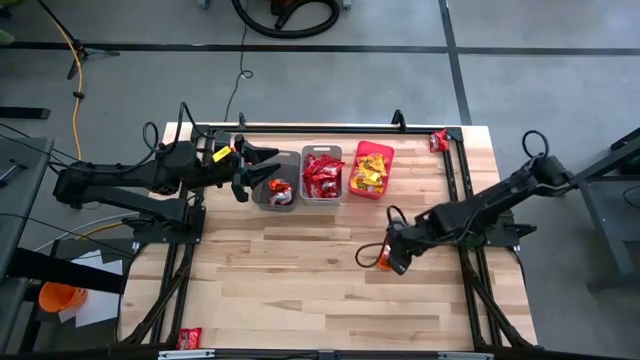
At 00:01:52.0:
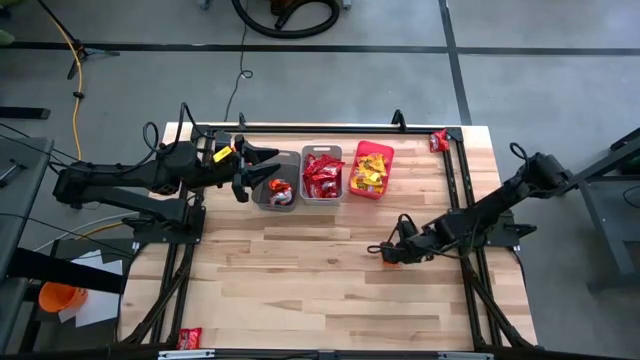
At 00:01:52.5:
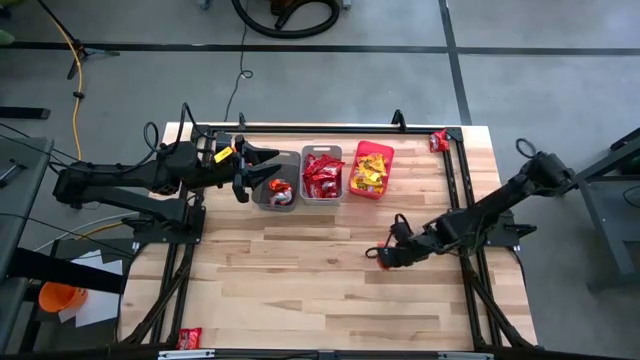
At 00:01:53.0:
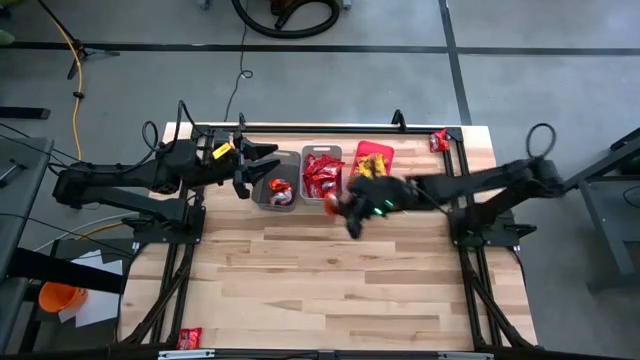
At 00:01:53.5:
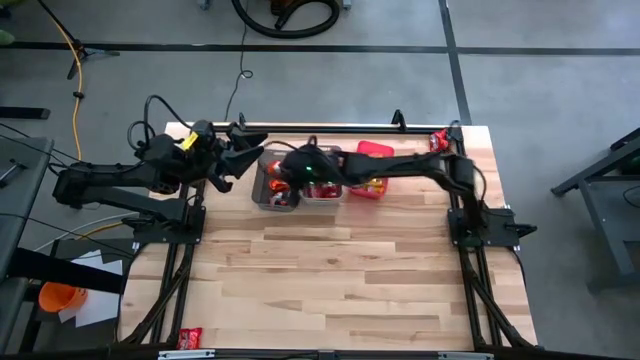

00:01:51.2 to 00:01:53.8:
Task: Sort candy
Put the bottom right orange candy into the black bin

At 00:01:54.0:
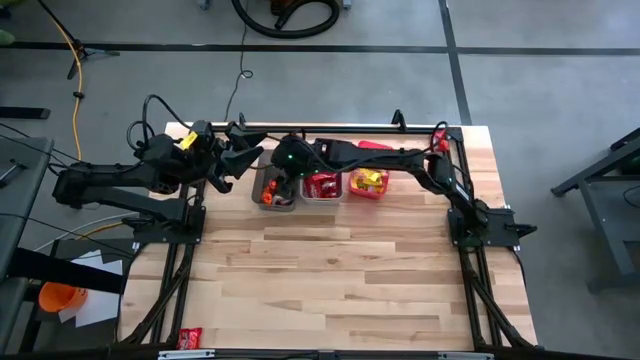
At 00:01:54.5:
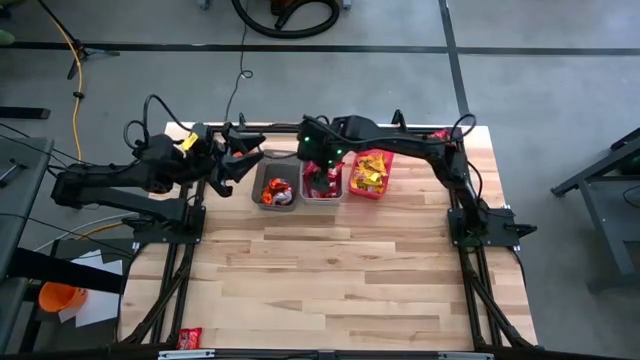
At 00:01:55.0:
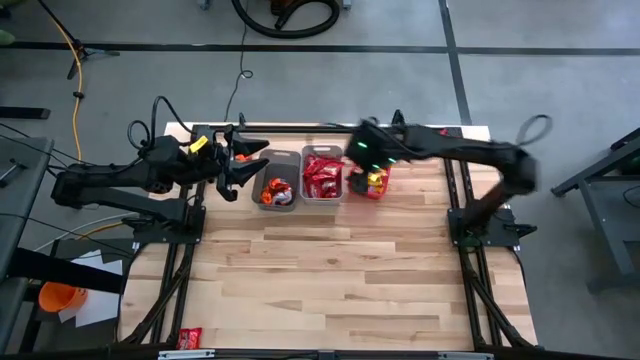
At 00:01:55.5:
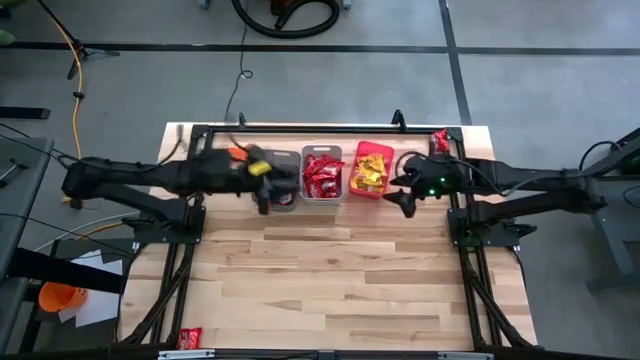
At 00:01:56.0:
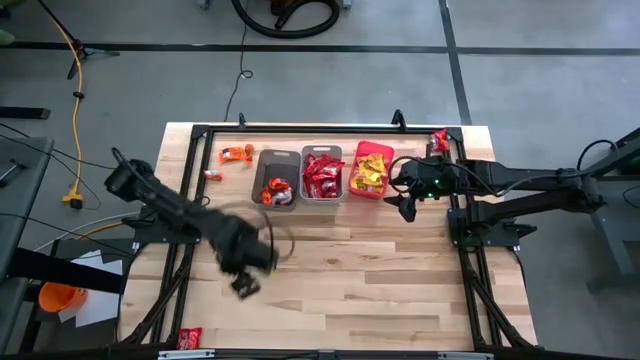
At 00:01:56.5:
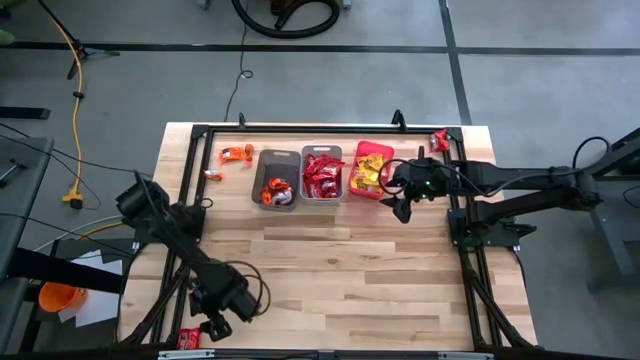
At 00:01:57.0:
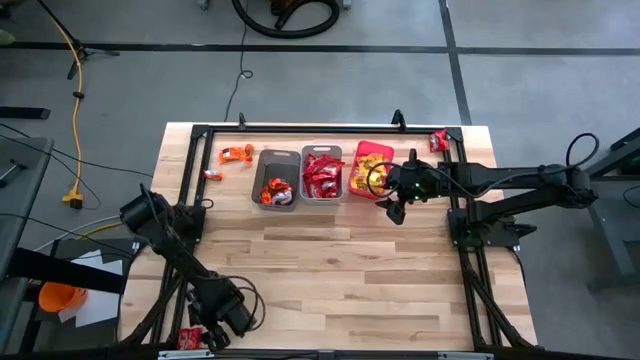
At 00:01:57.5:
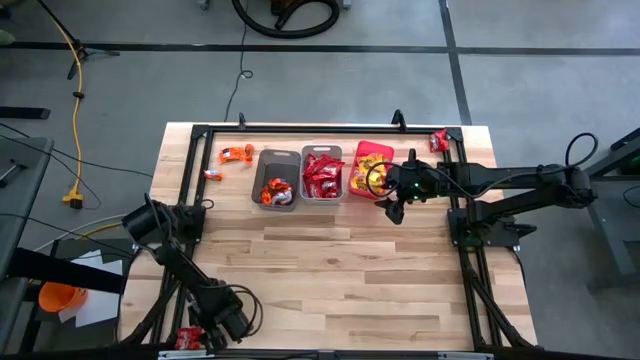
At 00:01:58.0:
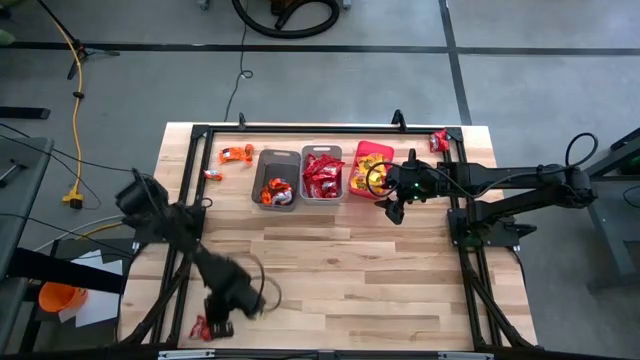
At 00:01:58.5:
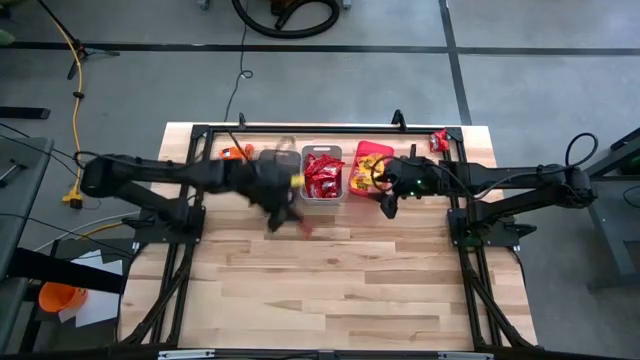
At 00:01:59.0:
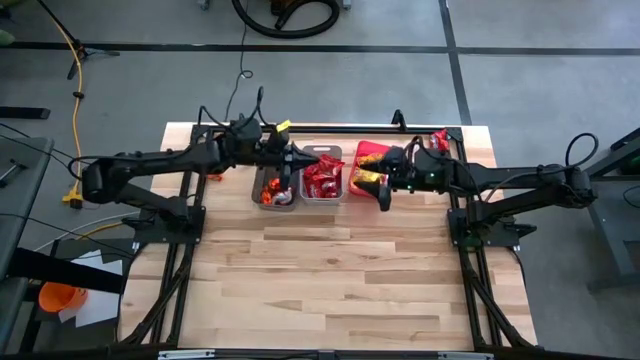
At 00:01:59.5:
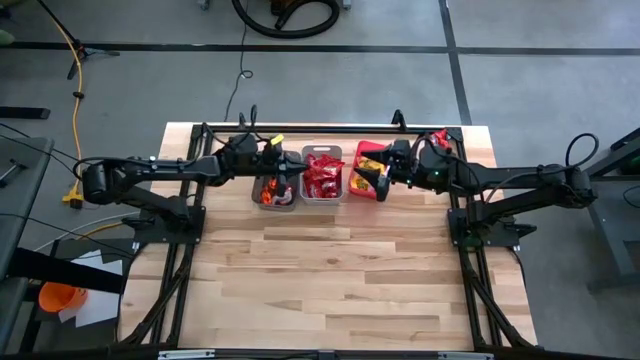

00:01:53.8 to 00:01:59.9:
Put the bottom left red candy into the gray bin

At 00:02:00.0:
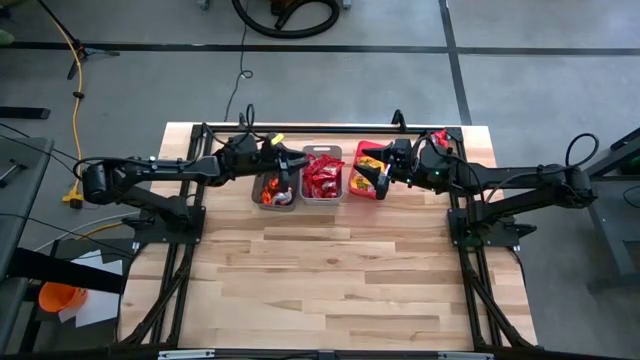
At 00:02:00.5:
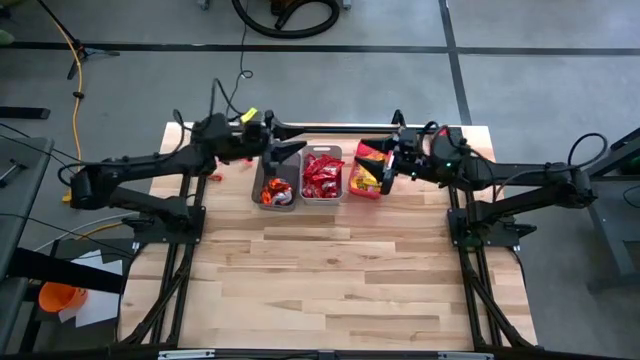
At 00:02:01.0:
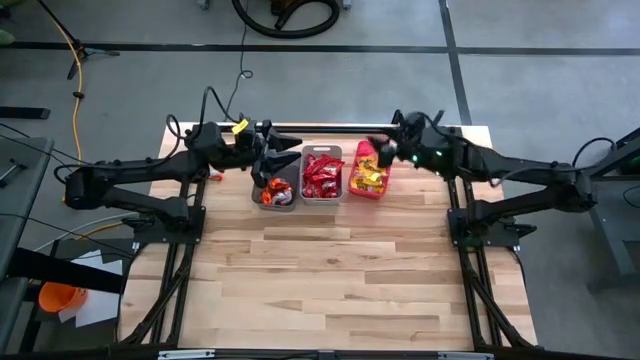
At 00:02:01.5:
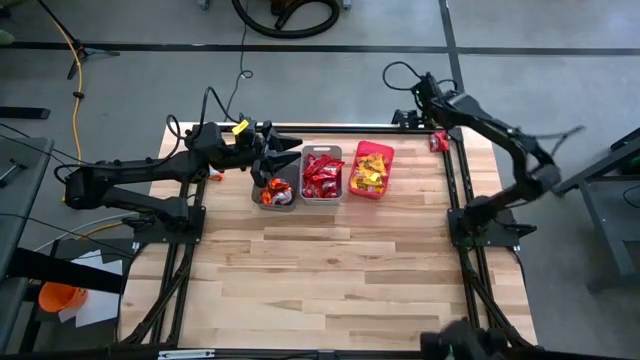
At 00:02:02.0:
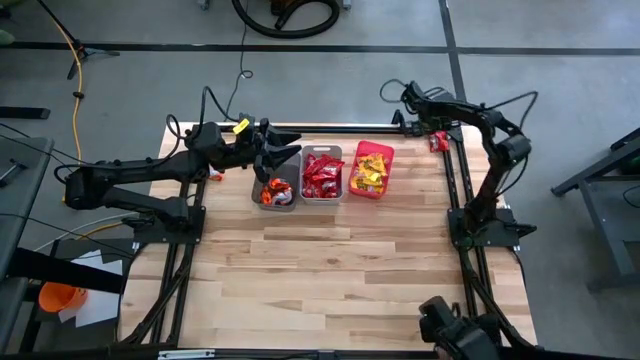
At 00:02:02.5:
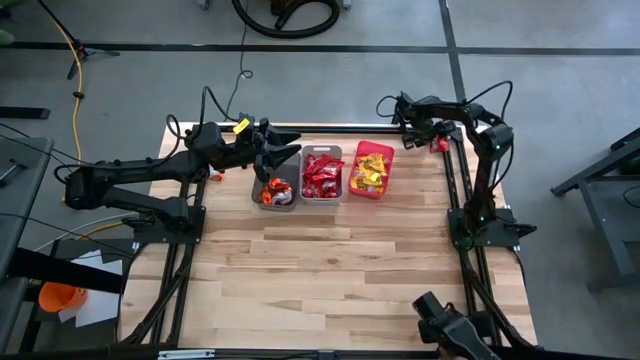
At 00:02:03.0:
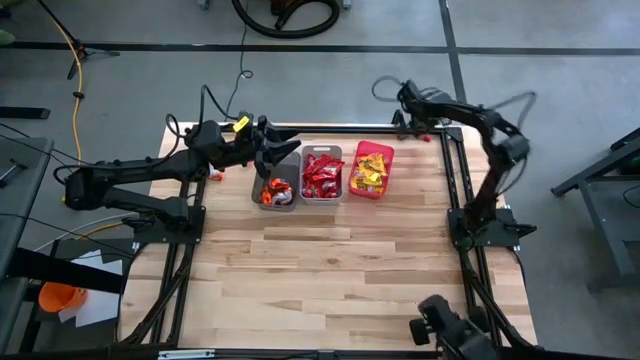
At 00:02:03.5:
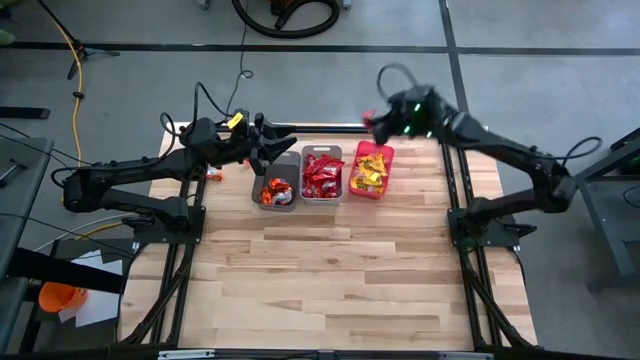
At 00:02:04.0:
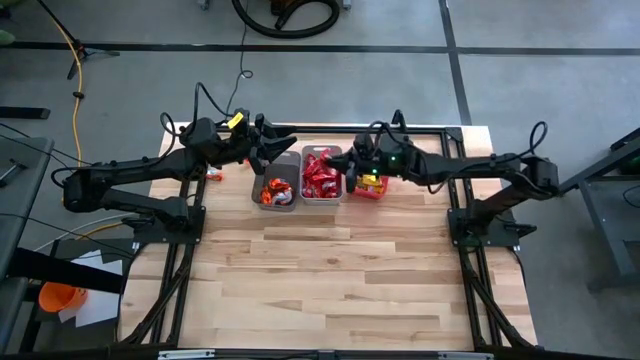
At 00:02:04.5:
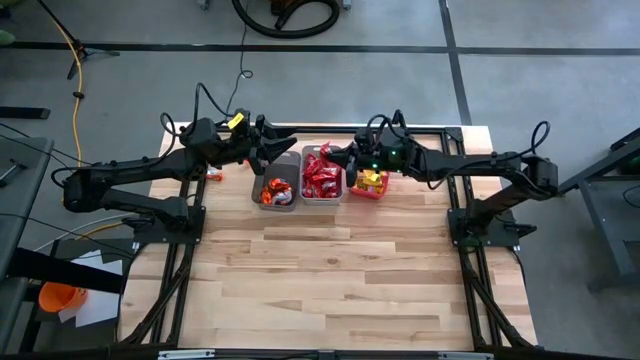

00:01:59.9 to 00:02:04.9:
Put the top right red candy into the gray bin

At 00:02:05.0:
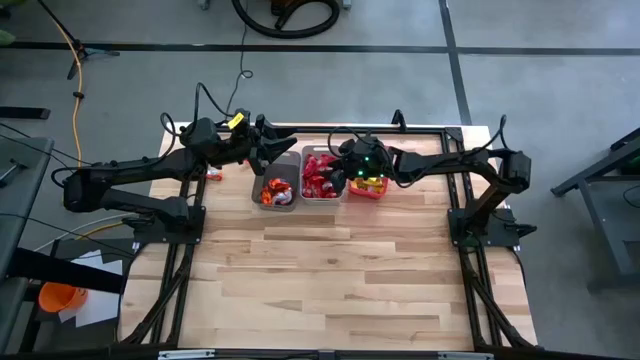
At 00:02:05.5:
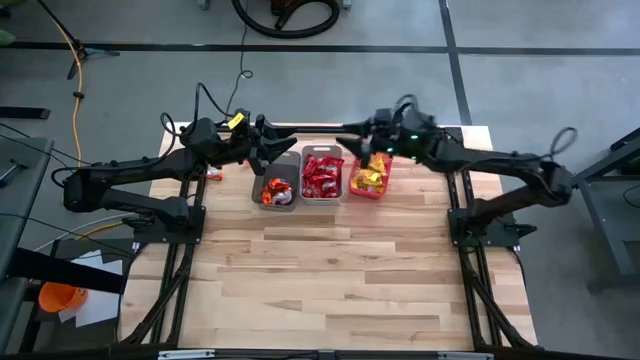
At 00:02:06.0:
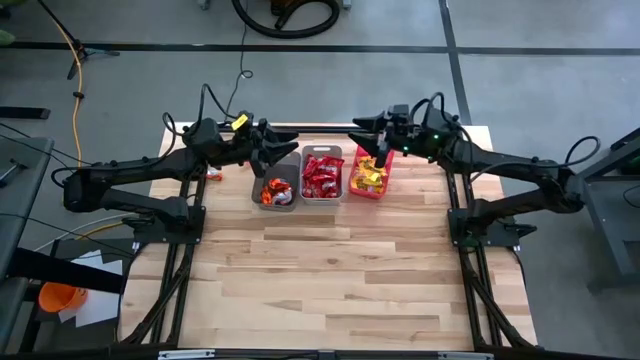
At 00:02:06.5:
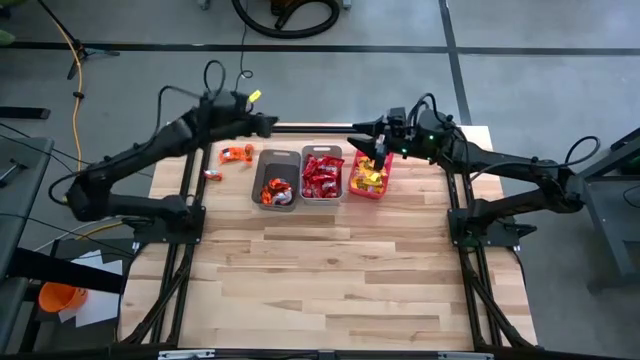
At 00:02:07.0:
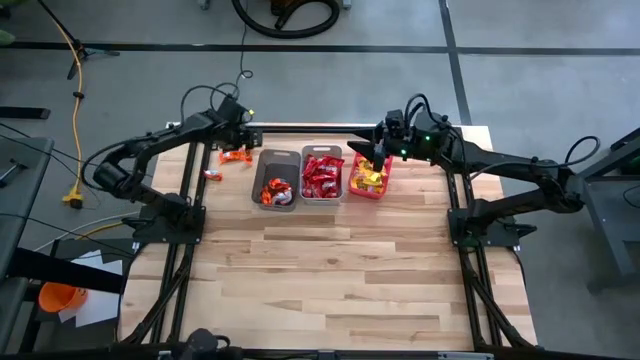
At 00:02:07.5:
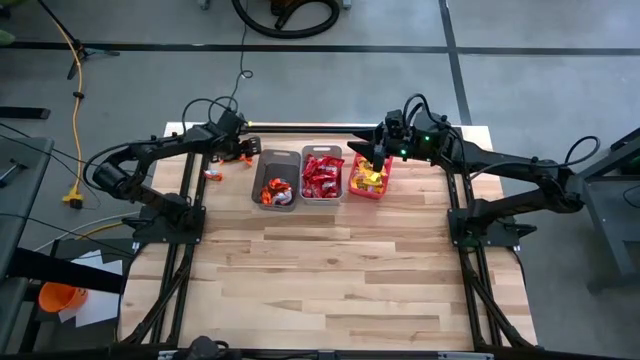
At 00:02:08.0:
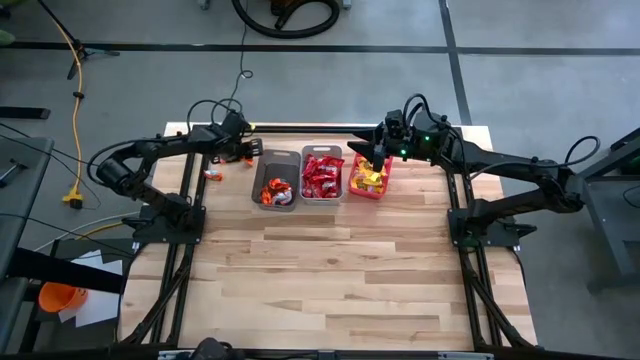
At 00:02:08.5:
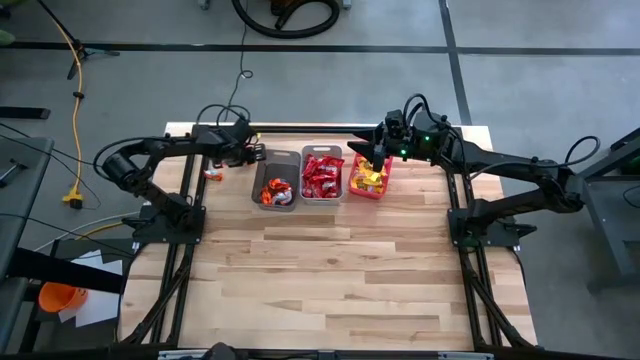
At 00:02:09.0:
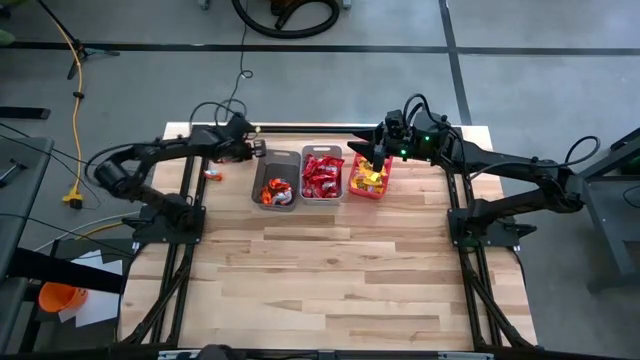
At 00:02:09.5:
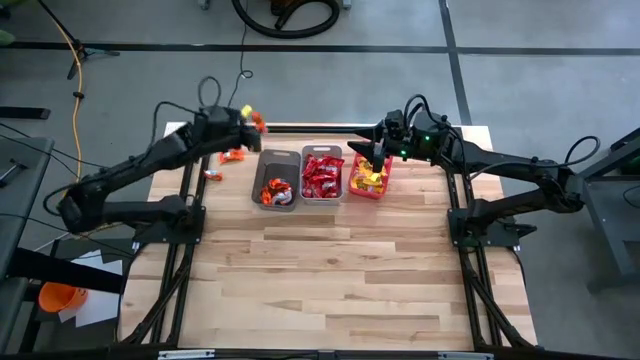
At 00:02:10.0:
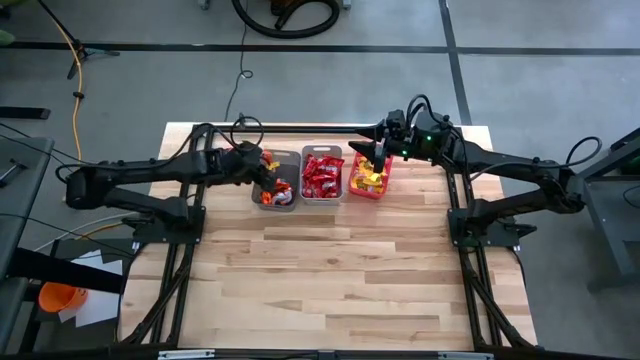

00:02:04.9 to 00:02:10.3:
Put the top left candy into the black bin

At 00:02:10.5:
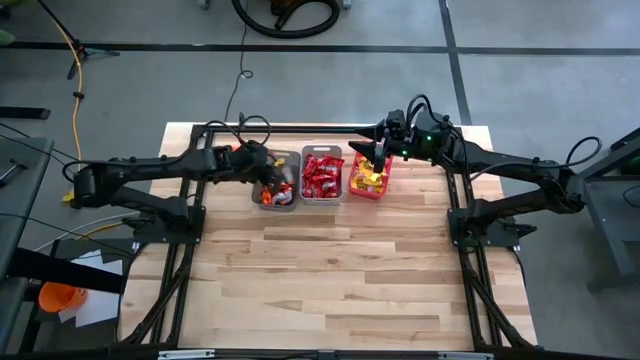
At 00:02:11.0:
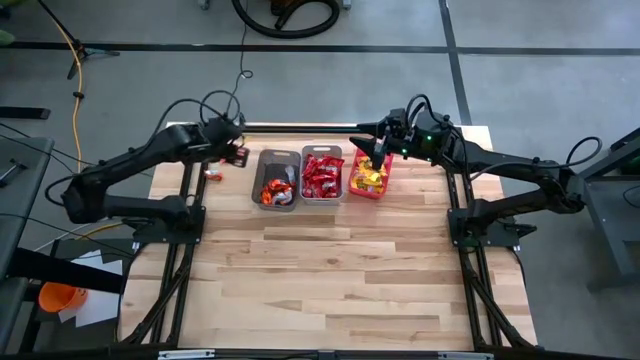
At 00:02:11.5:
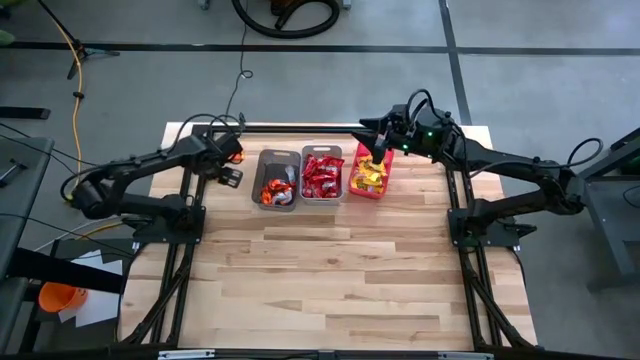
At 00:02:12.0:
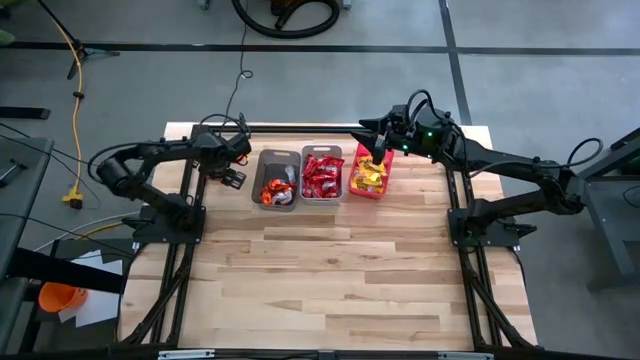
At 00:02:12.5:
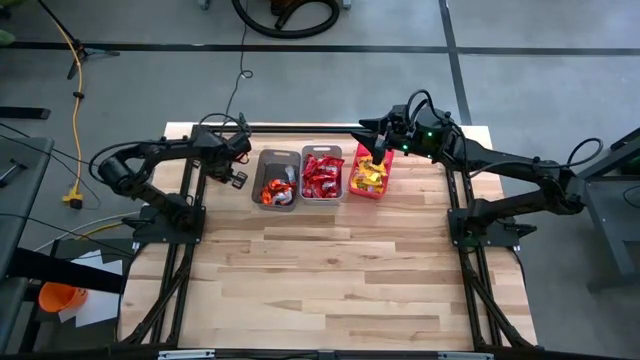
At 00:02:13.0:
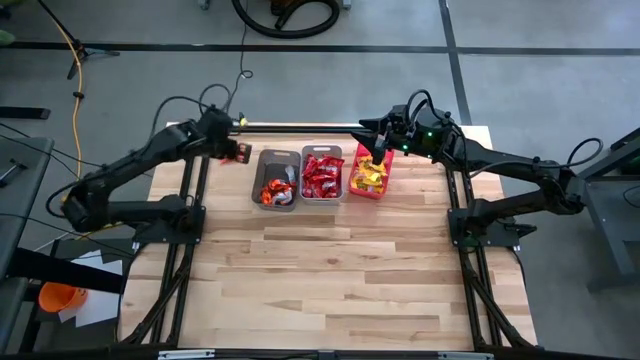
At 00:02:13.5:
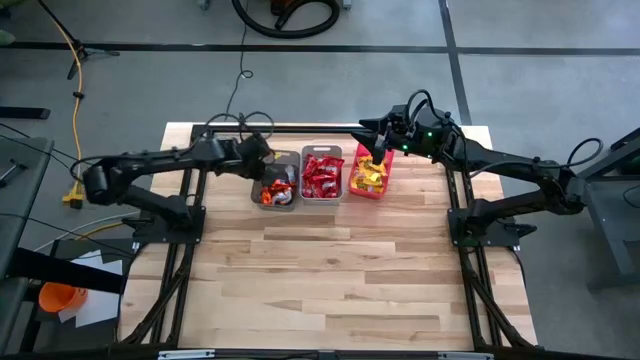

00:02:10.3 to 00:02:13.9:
Put the top left orange candy into the black bin
